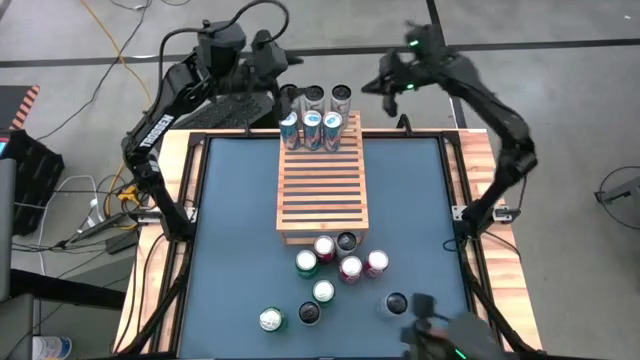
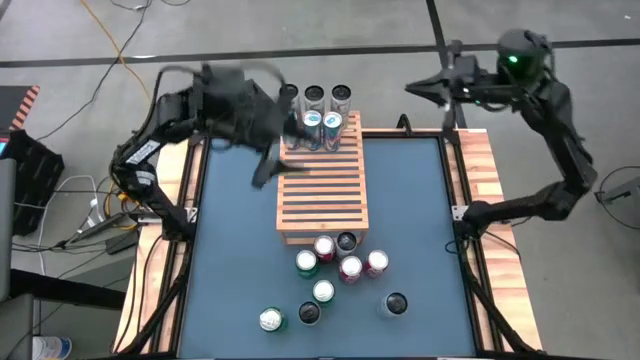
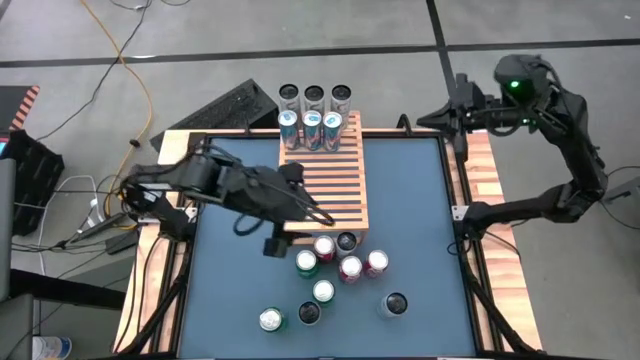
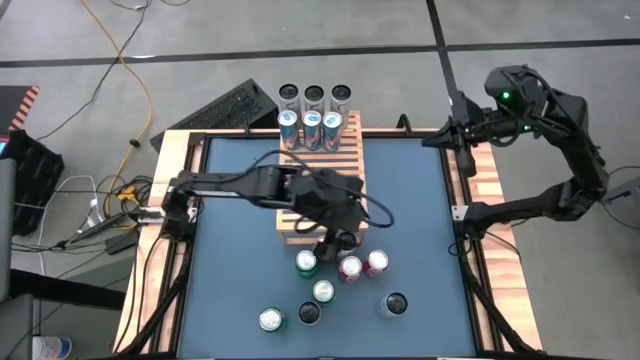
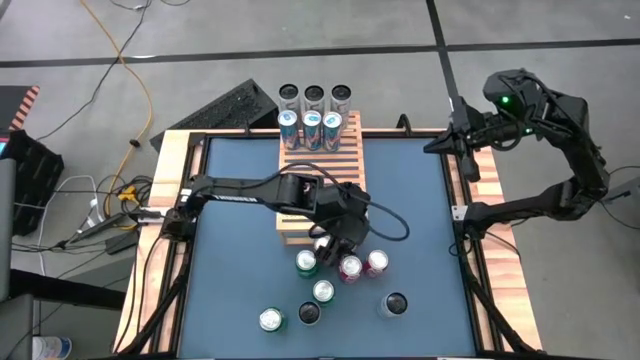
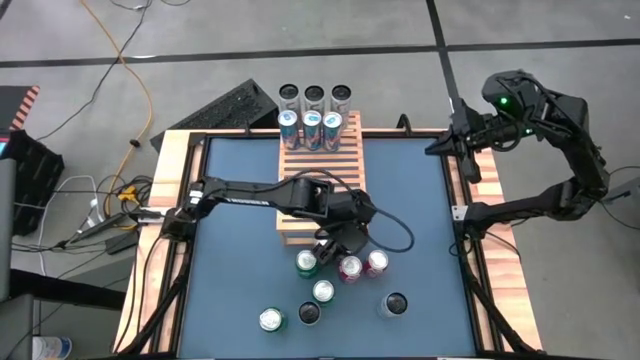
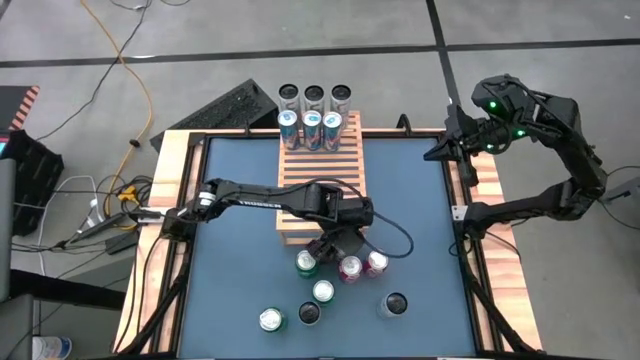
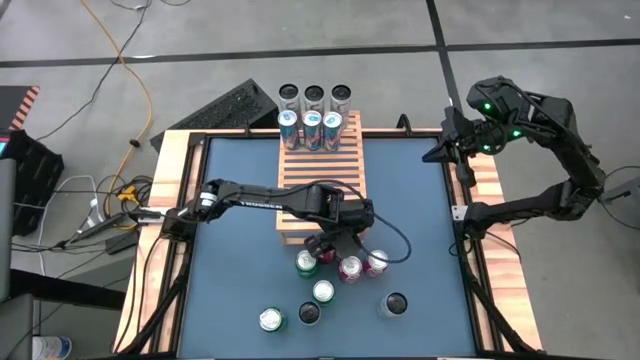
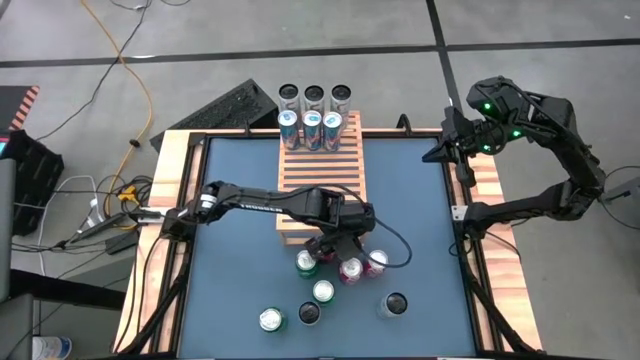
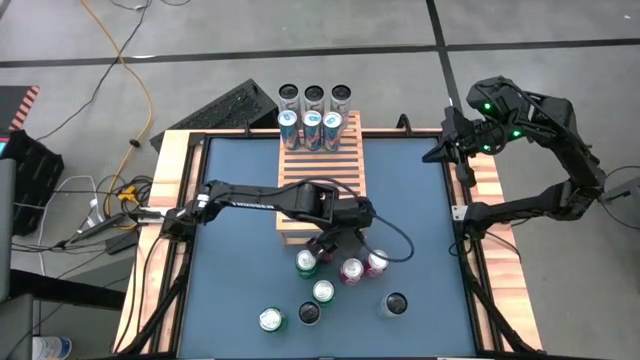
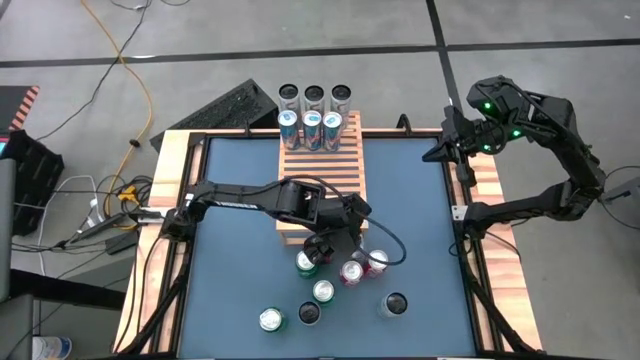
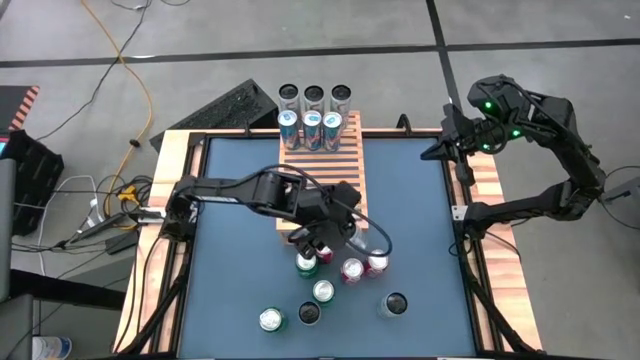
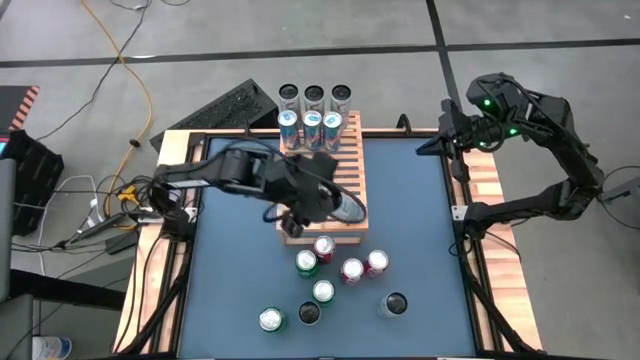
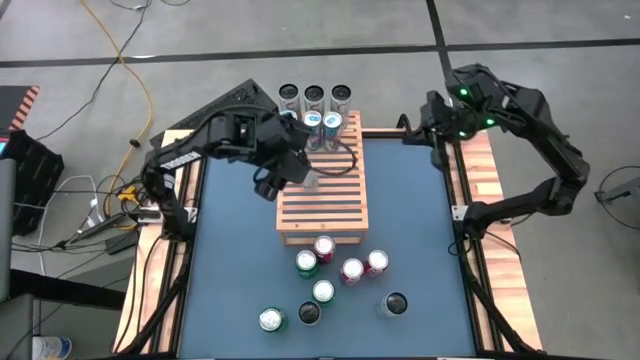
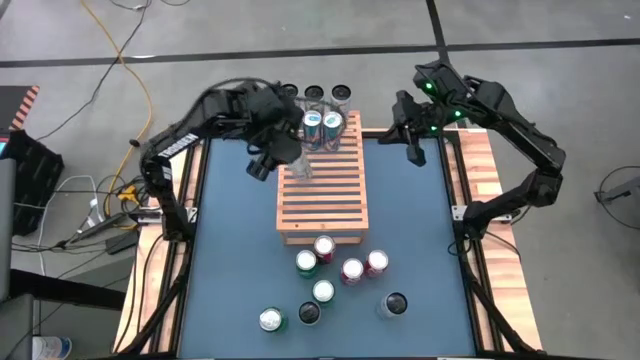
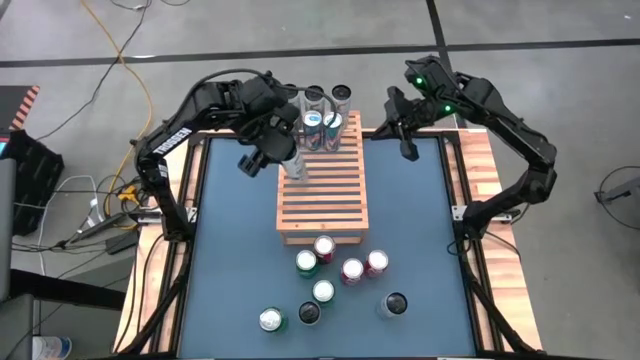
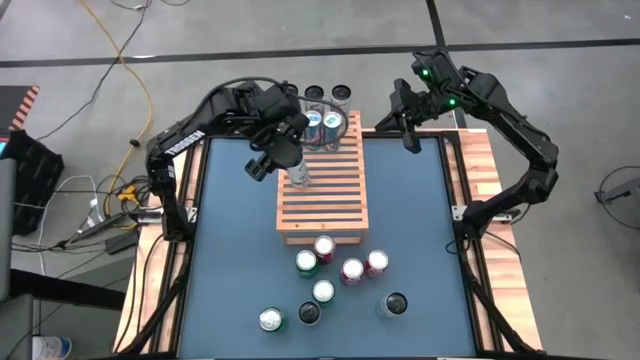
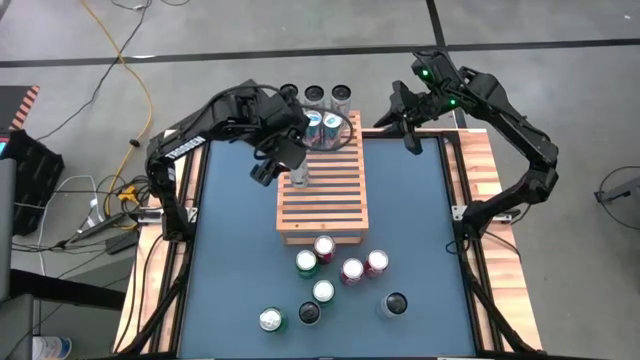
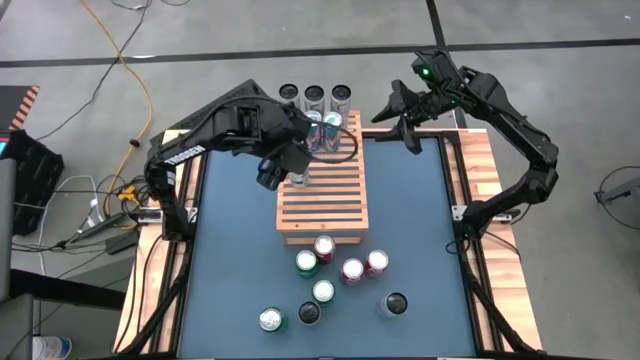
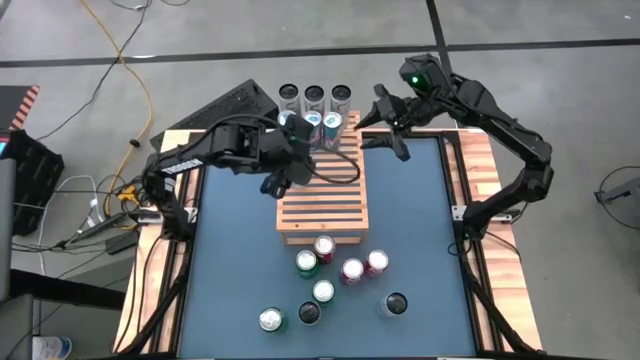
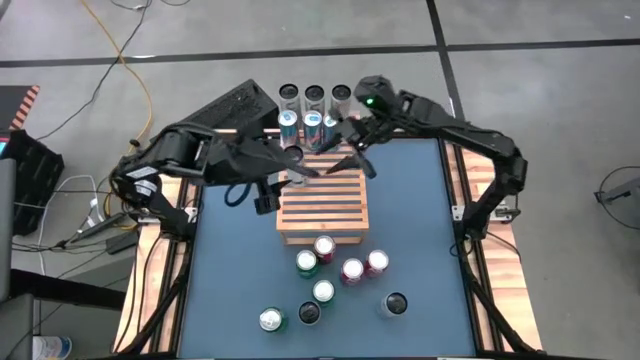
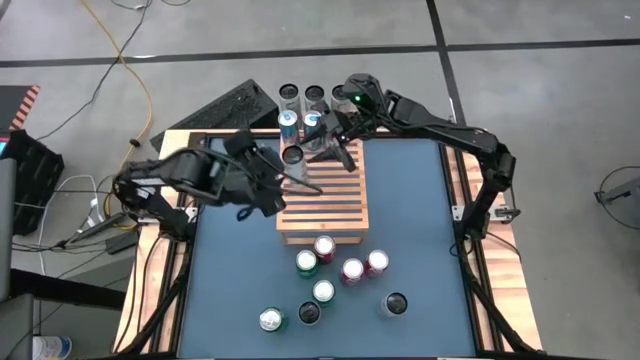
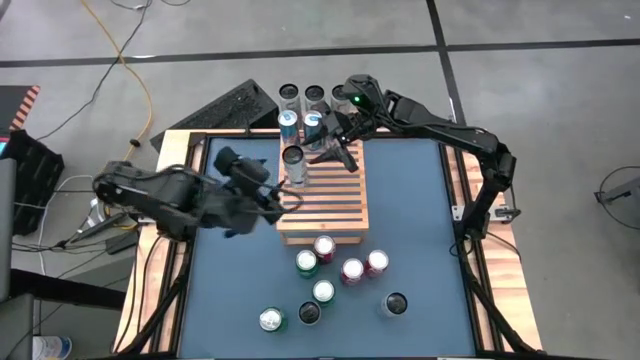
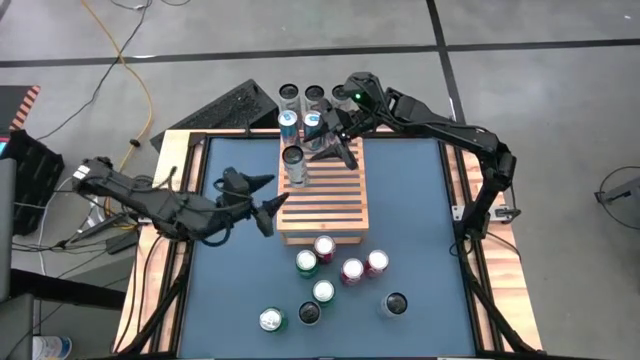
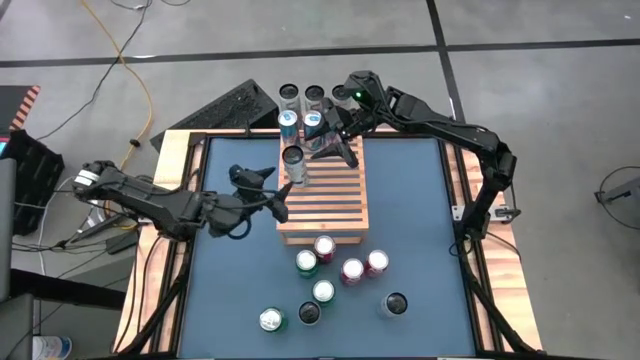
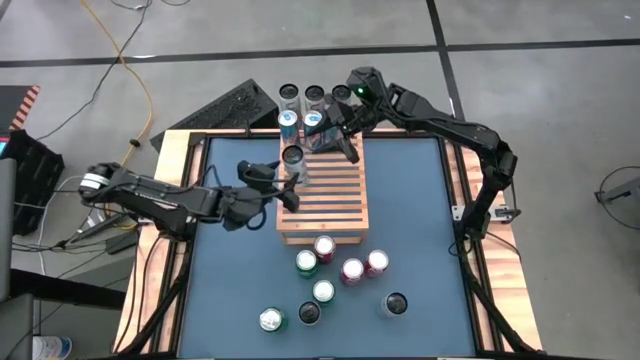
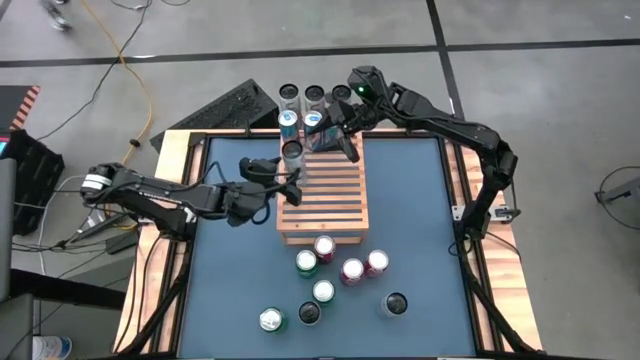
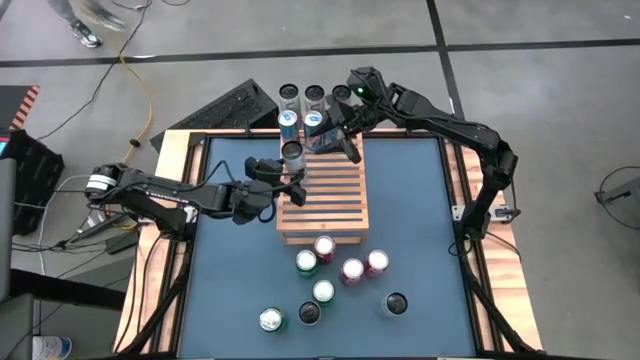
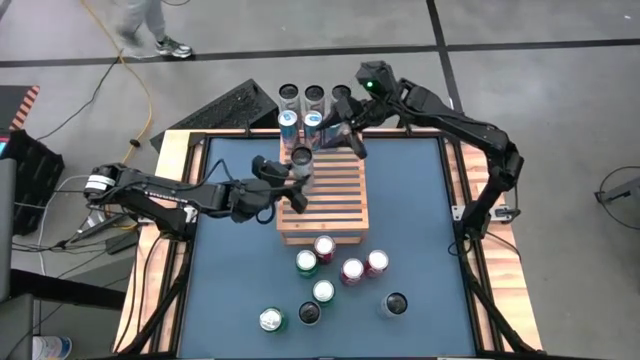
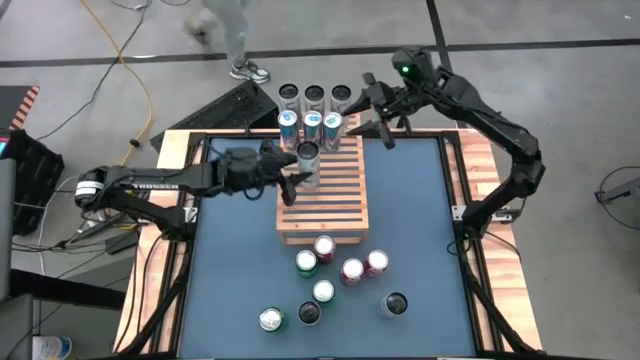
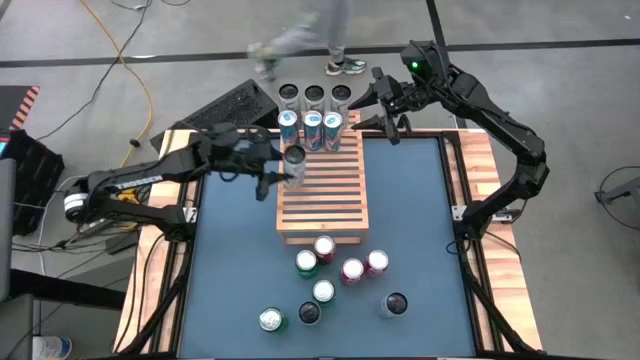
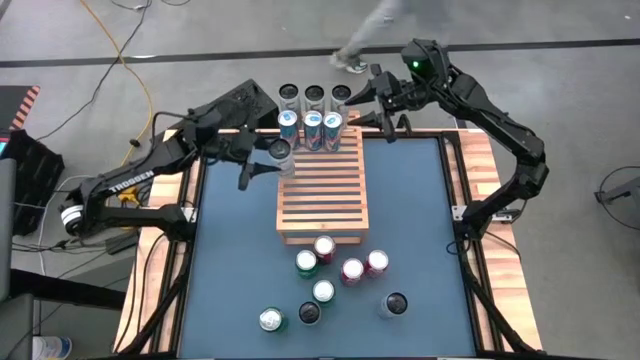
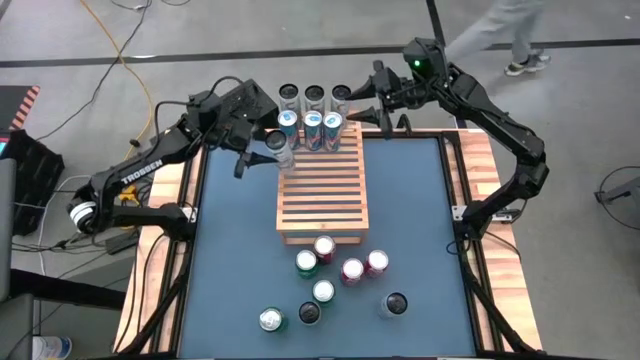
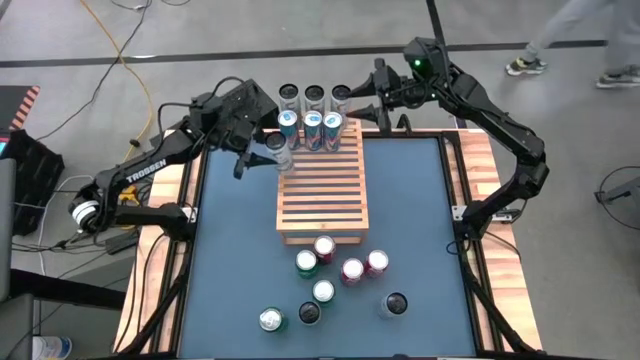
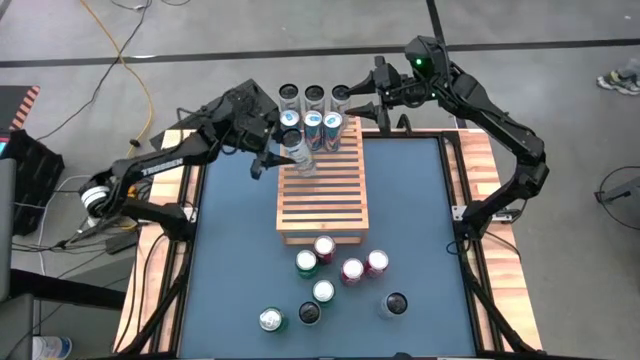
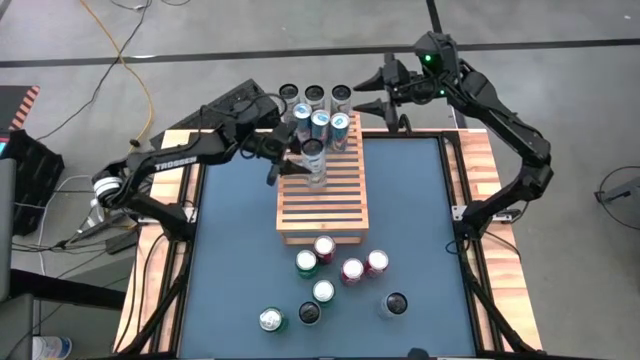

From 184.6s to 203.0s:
Task: Place canned beverage on shelf
Put the top center white blue soda can on the shelf

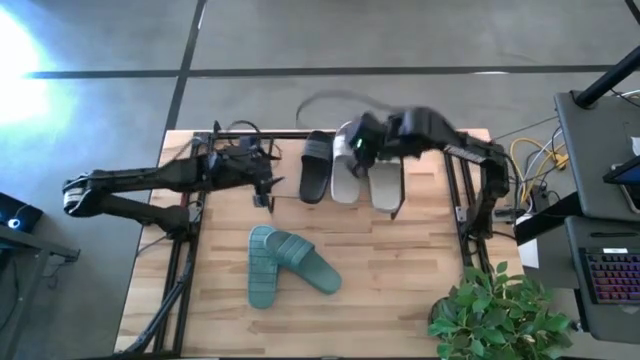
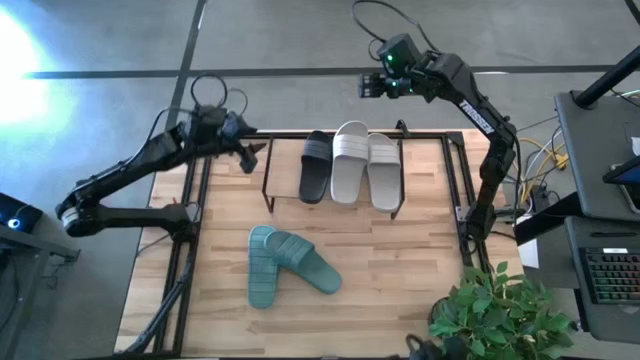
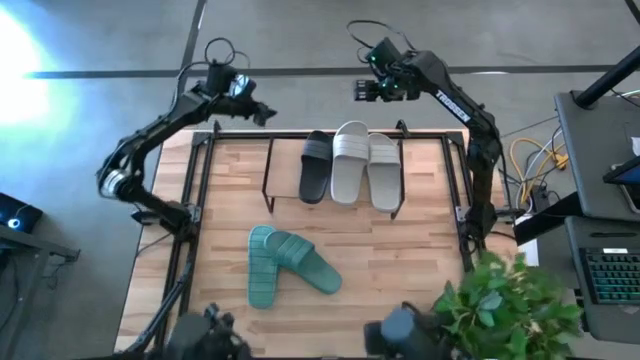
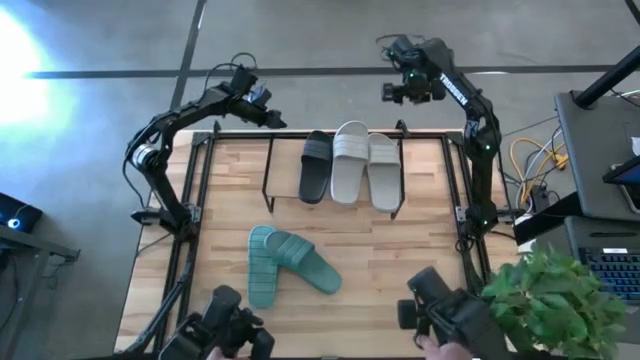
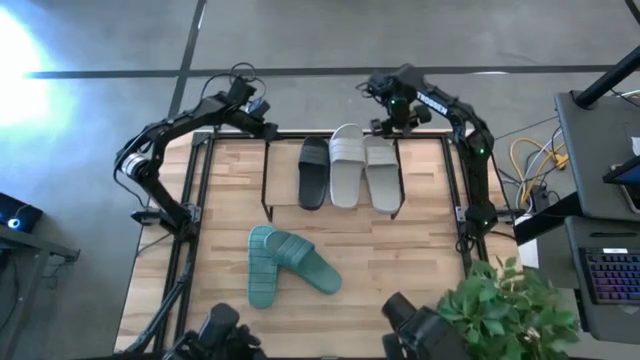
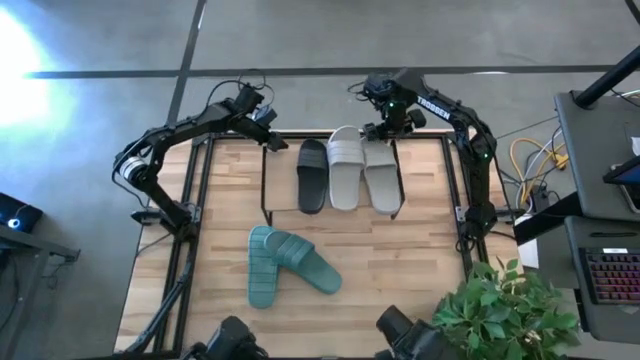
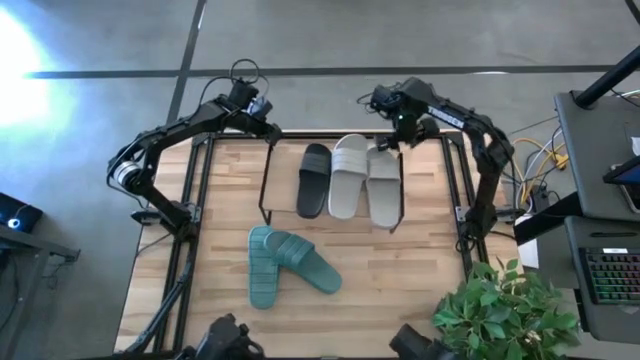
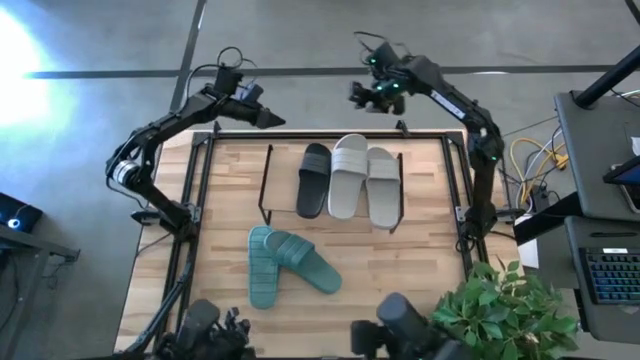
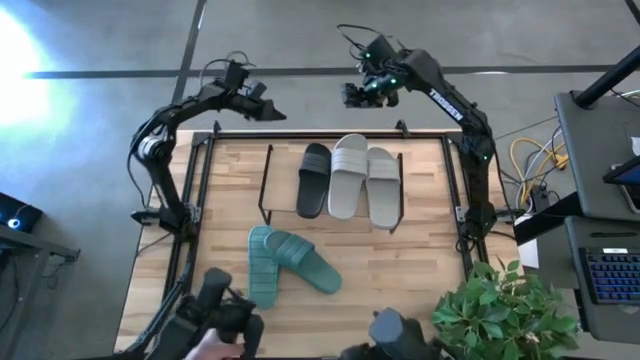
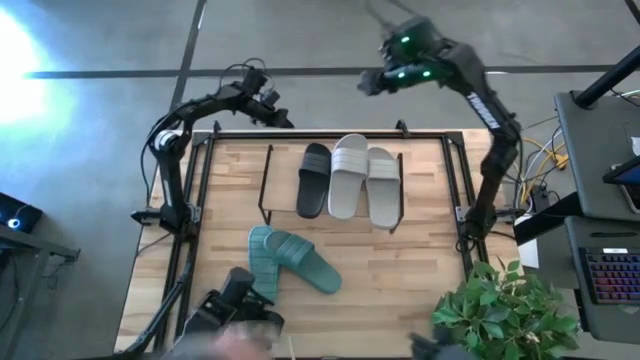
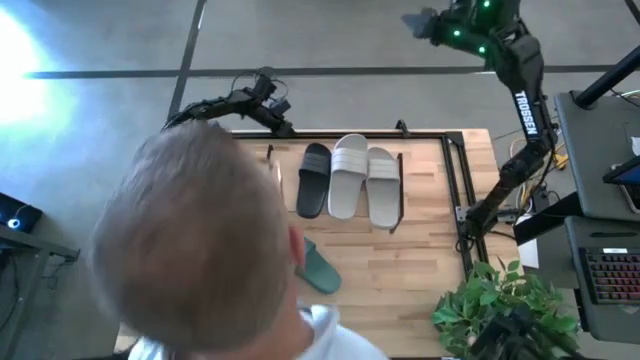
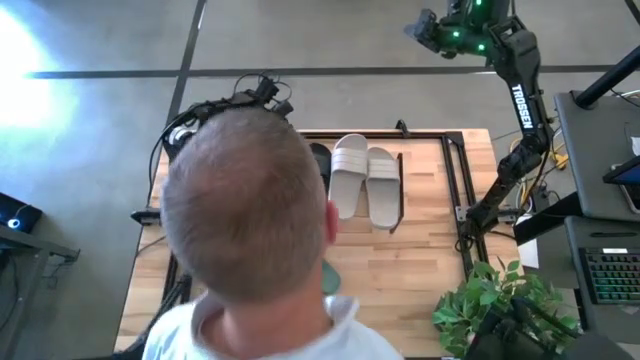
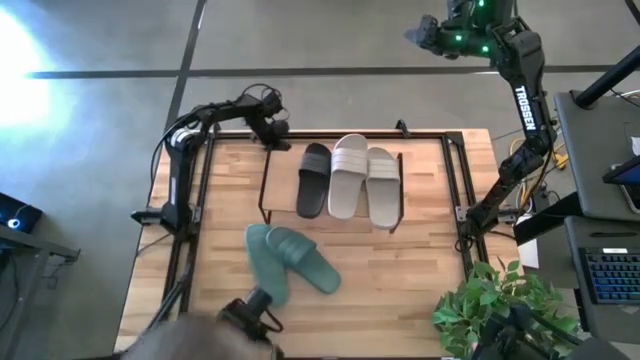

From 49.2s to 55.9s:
Task: Pick and place slides into the shelf
Adjust the shelf
